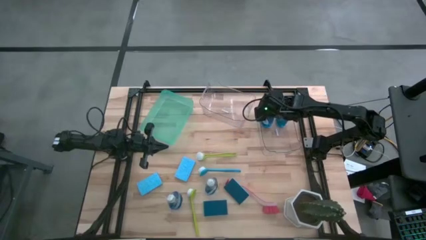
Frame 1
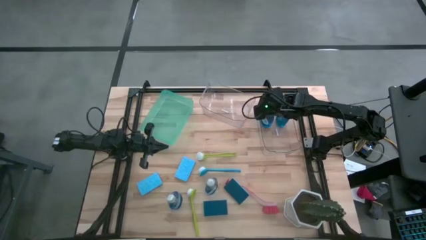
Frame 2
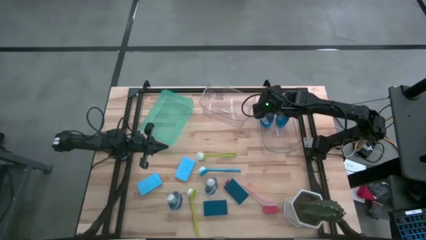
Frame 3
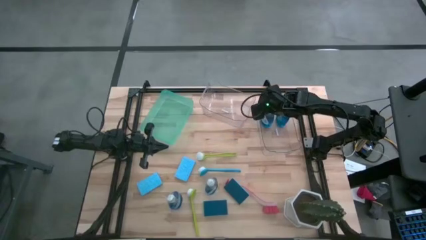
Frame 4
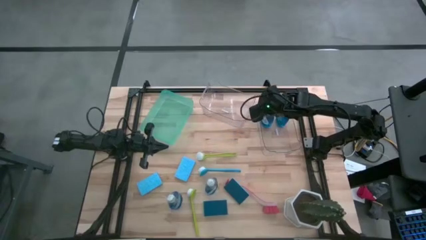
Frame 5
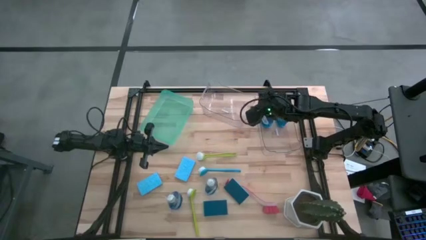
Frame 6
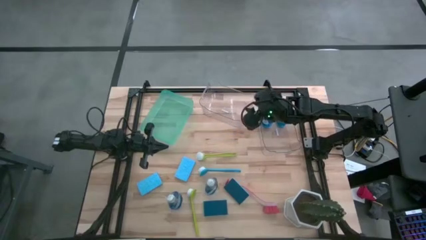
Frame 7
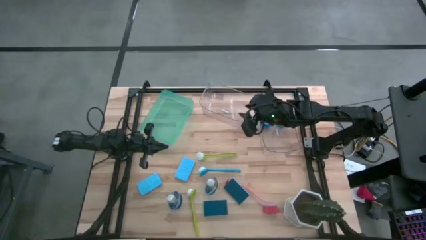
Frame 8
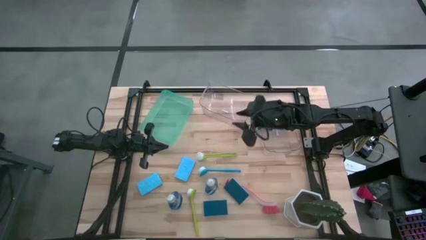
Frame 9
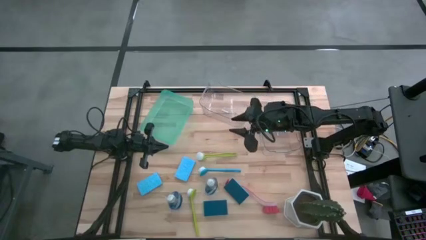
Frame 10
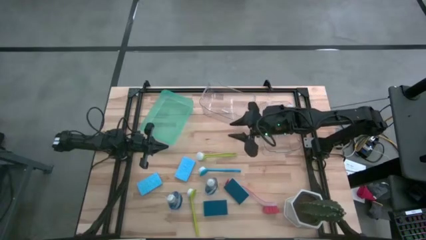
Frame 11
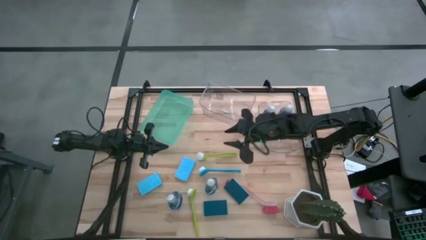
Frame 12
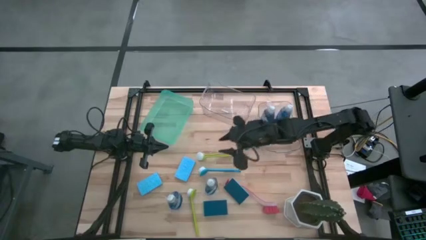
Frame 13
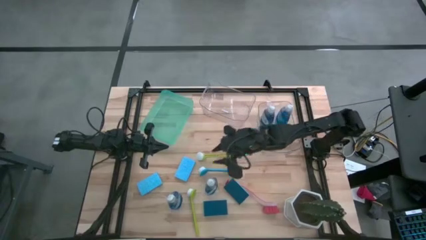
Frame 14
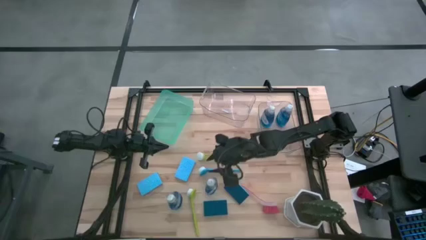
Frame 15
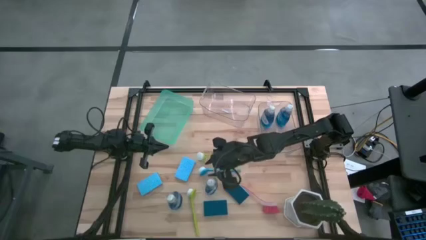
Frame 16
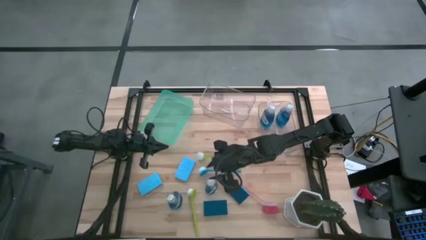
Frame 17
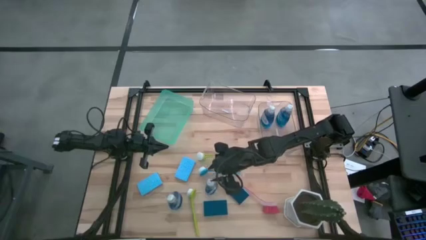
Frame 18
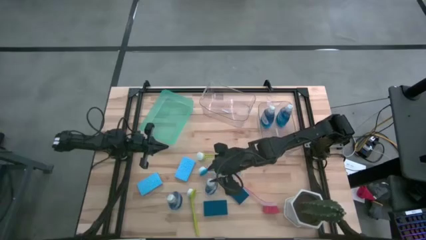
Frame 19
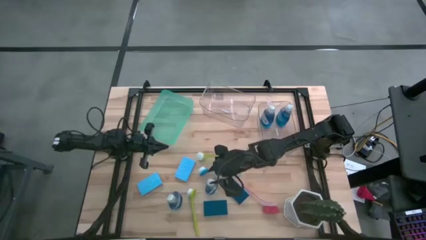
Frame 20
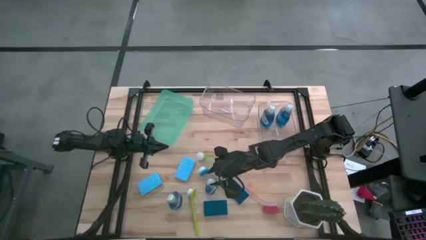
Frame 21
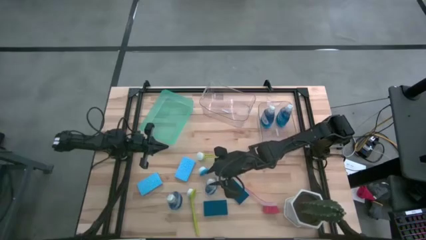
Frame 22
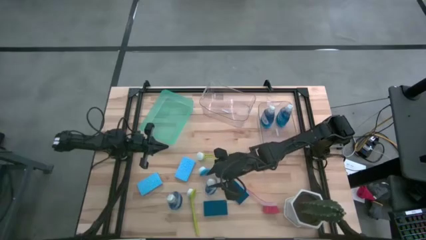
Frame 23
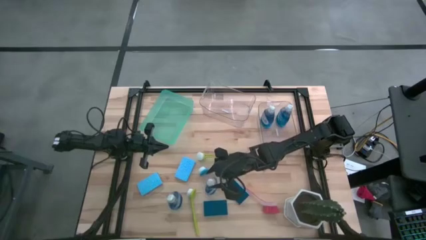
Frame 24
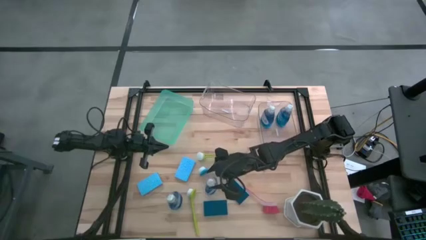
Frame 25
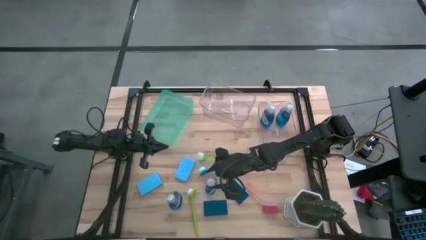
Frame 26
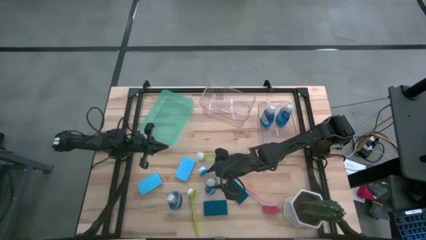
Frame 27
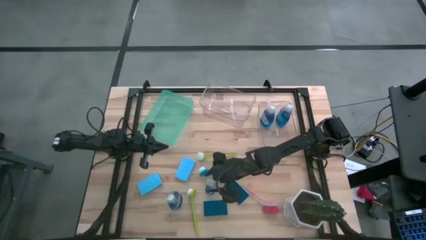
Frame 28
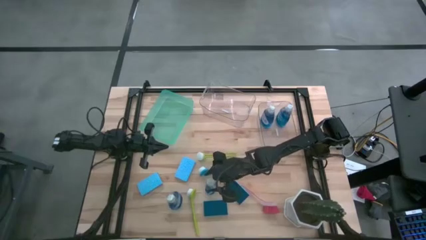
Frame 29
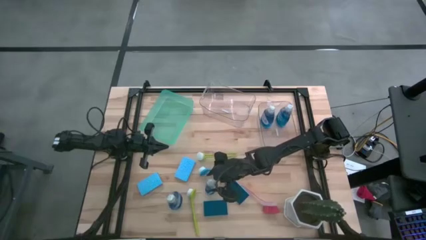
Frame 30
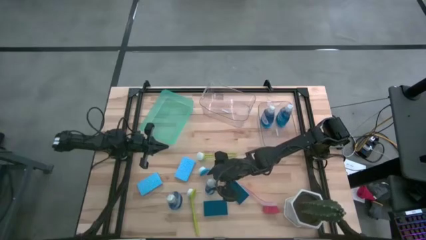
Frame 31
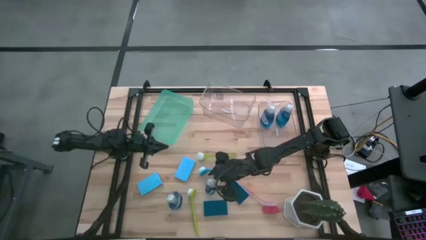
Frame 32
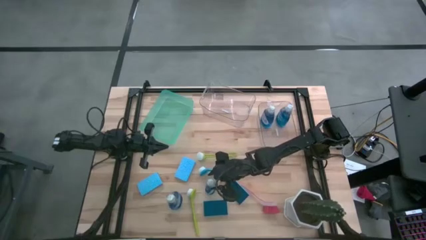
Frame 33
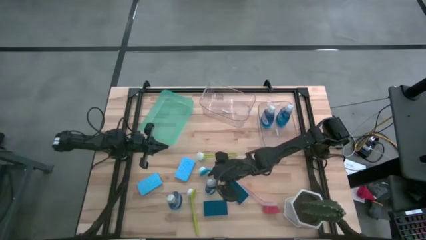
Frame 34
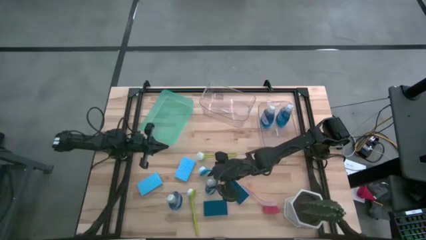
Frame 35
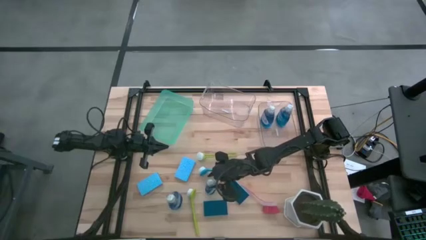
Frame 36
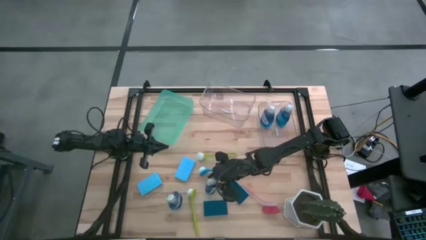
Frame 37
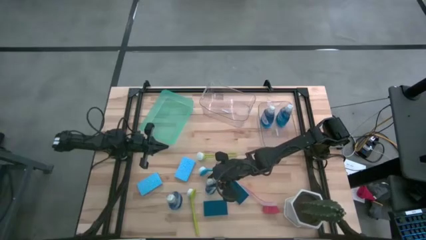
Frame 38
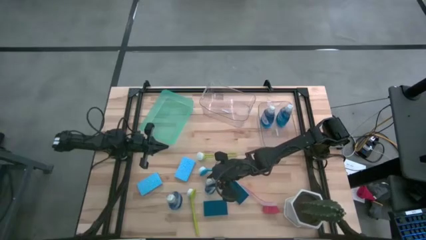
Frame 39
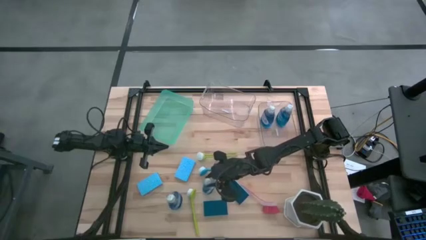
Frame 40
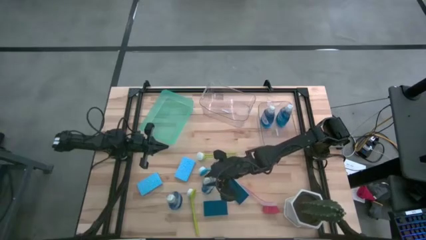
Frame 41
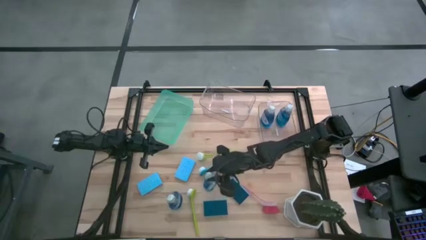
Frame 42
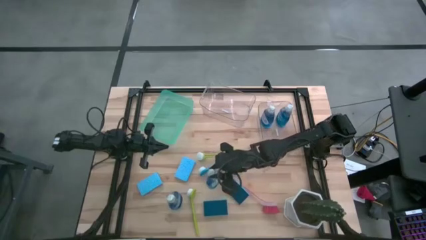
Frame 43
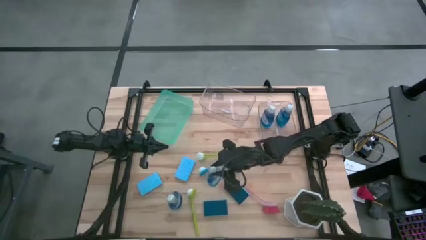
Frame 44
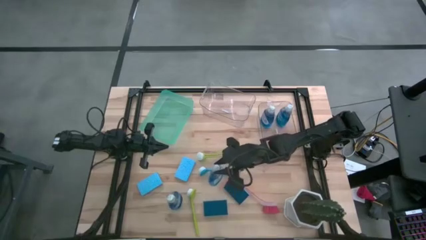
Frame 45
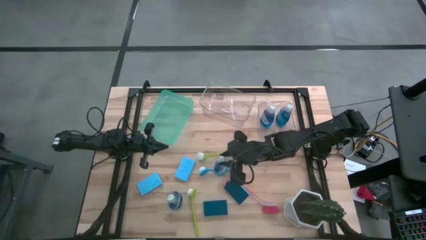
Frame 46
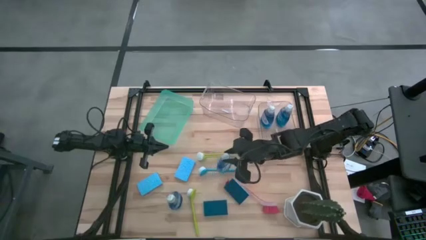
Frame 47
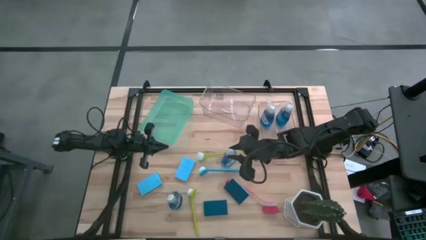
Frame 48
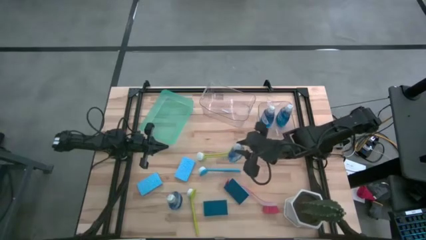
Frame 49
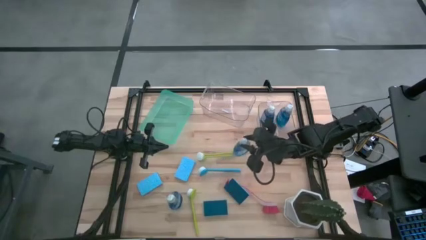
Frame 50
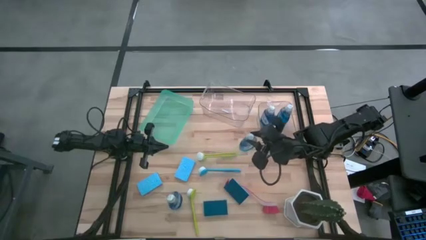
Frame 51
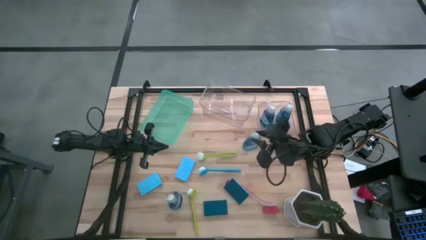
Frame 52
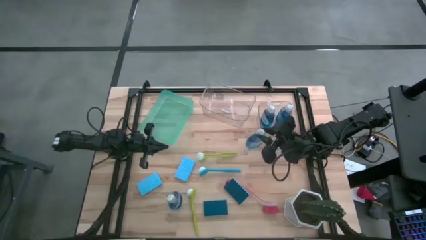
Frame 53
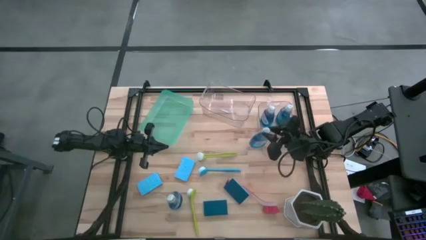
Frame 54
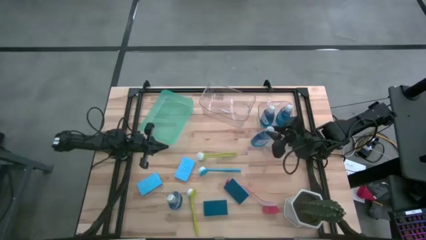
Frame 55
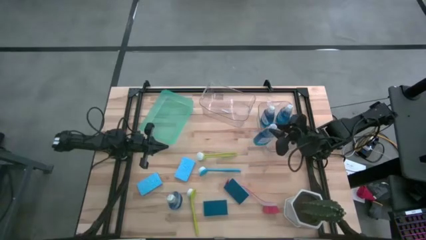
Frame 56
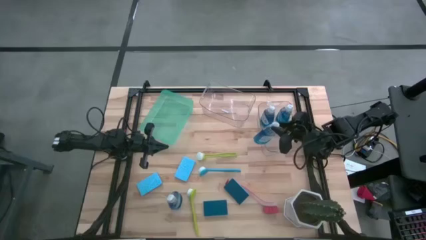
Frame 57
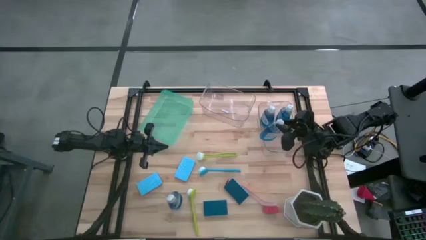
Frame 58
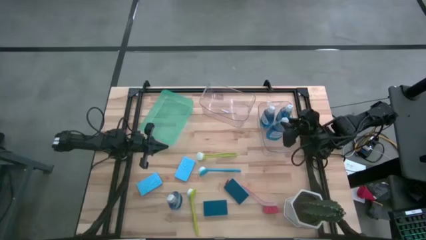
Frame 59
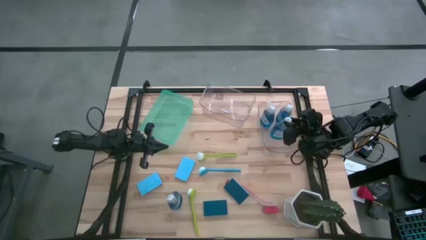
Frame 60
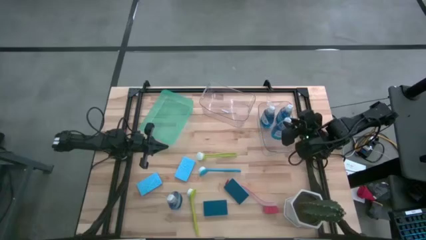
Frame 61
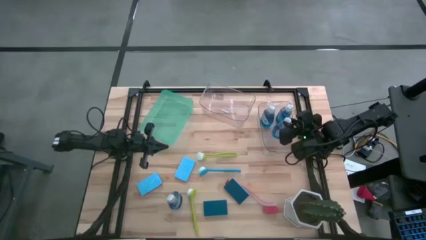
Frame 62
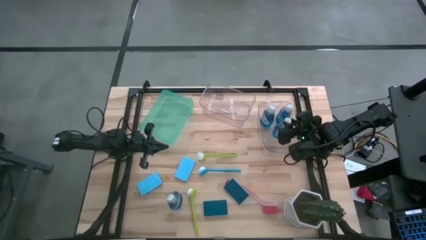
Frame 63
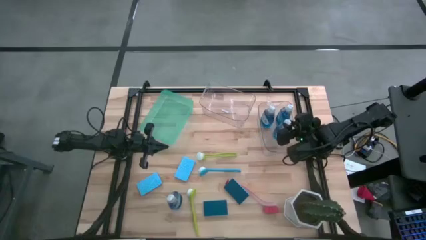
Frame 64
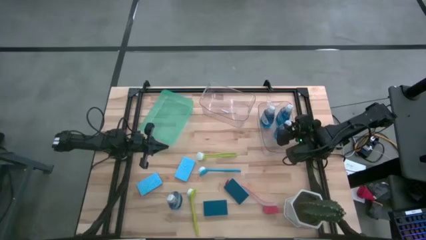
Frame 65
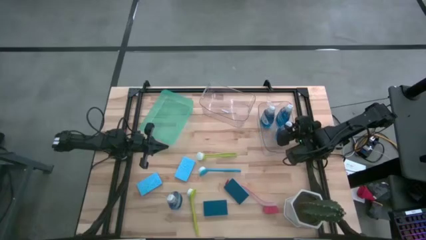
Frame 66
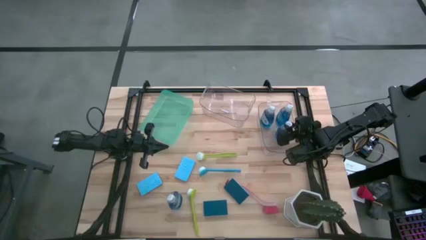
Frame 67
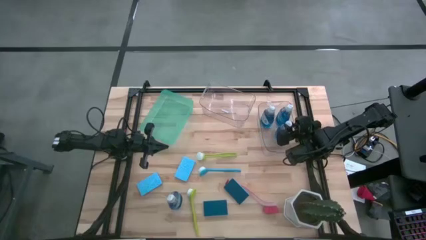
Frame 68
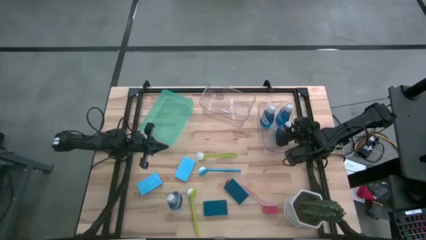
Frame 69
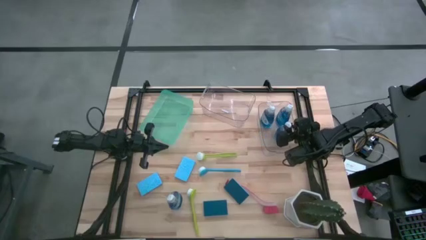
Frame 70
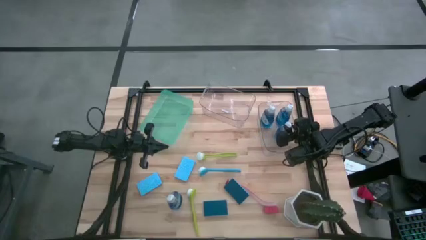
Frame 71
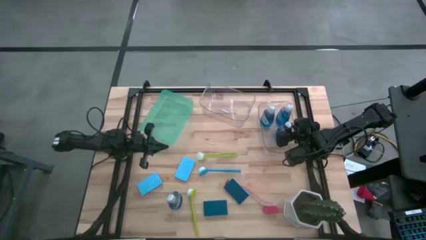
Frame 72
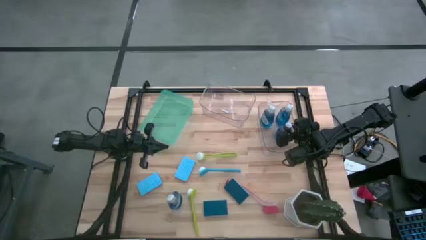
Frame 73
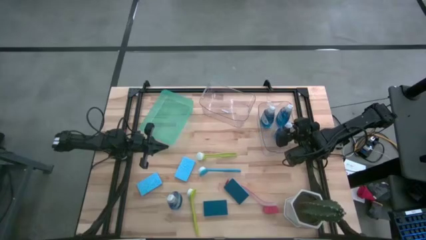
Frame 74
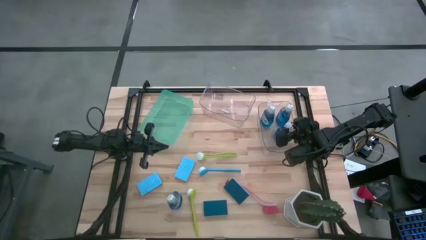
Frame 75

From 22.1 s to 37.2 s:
Task: Pick & Place Kitchen Sink Supplies
Put the blue dishwashing liquid bottle into the right transparent bin
